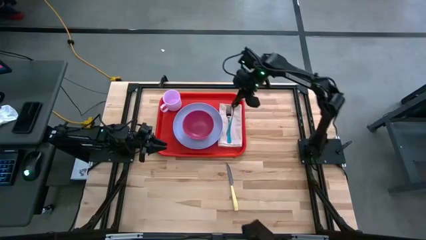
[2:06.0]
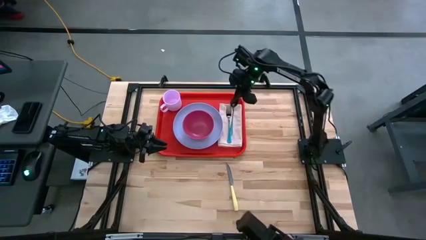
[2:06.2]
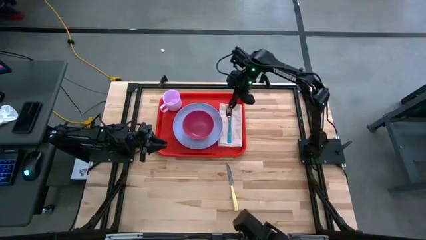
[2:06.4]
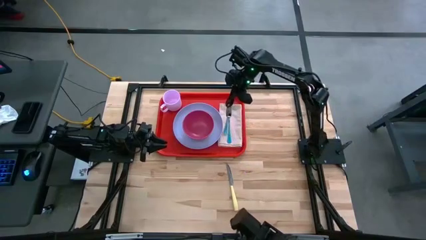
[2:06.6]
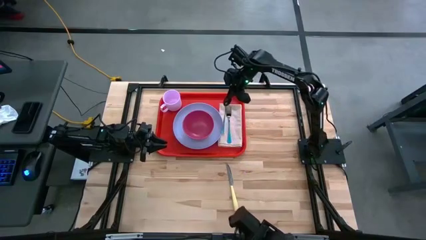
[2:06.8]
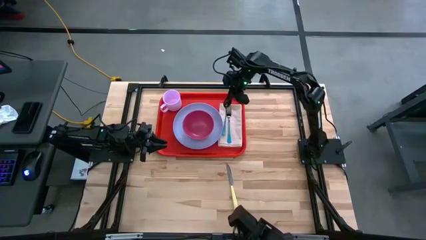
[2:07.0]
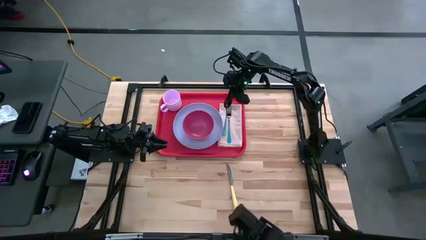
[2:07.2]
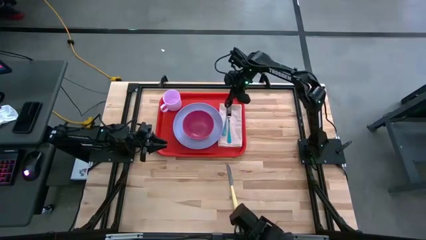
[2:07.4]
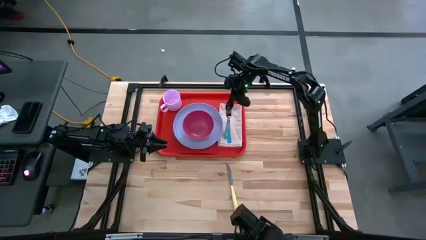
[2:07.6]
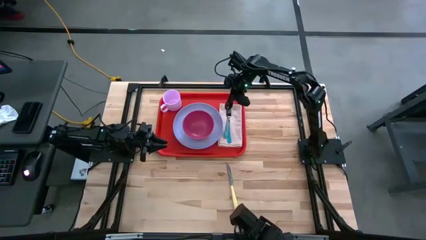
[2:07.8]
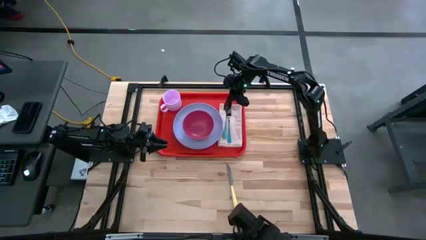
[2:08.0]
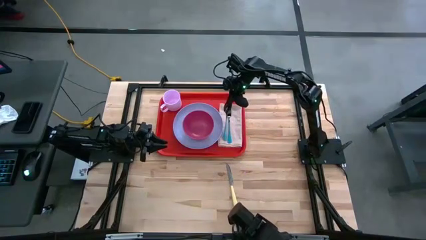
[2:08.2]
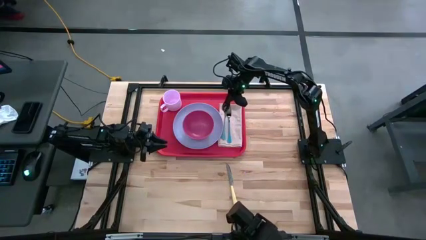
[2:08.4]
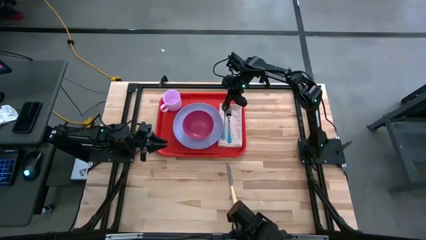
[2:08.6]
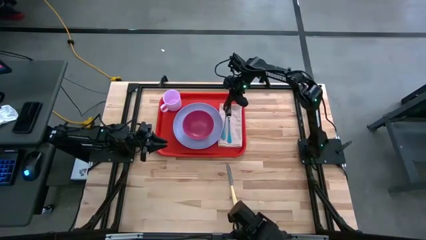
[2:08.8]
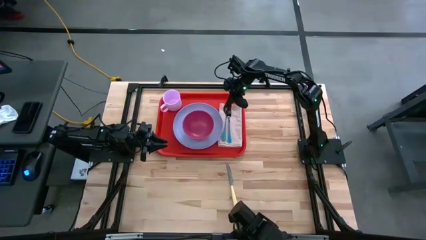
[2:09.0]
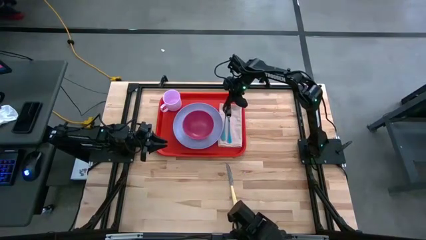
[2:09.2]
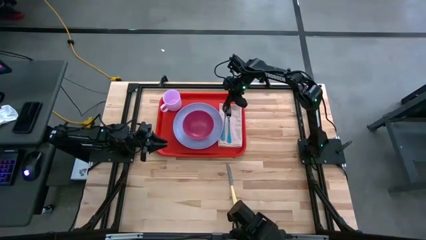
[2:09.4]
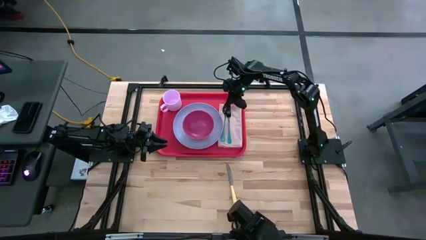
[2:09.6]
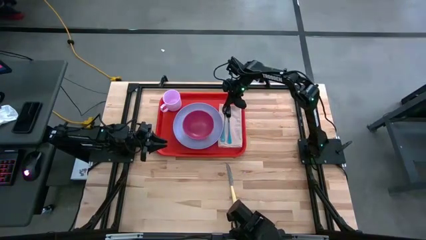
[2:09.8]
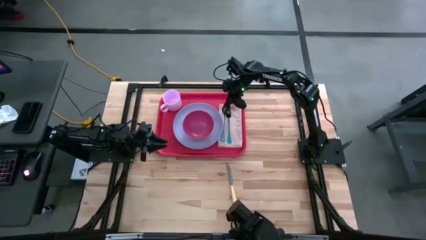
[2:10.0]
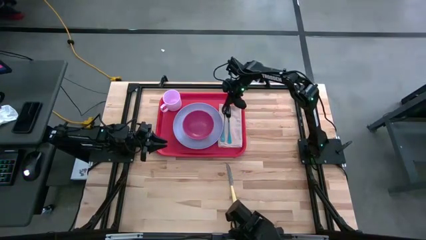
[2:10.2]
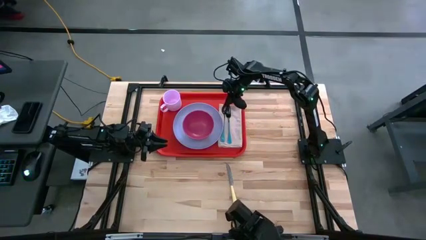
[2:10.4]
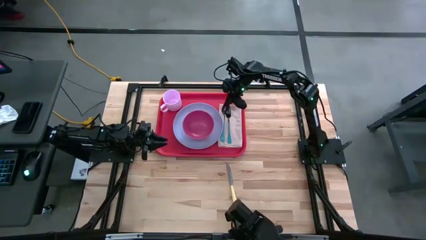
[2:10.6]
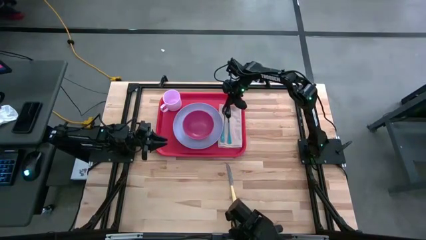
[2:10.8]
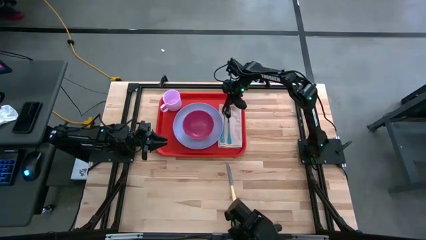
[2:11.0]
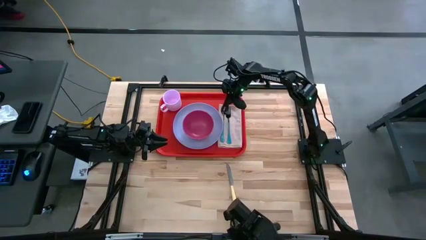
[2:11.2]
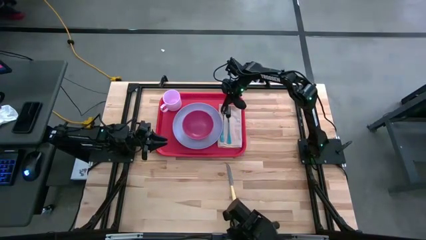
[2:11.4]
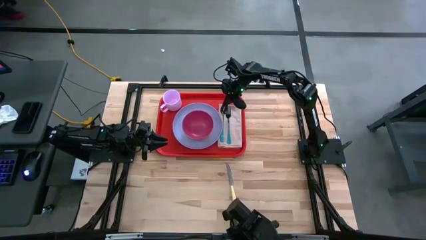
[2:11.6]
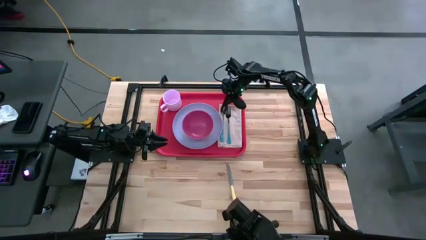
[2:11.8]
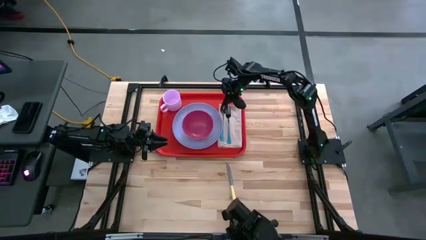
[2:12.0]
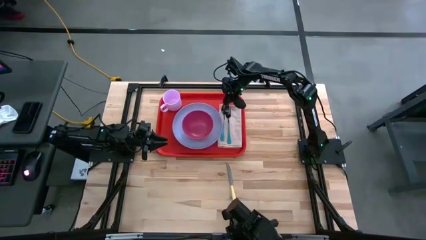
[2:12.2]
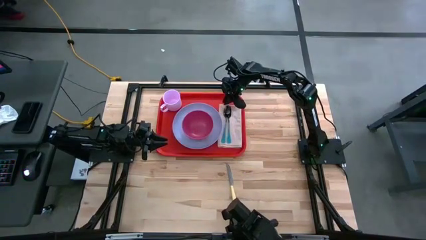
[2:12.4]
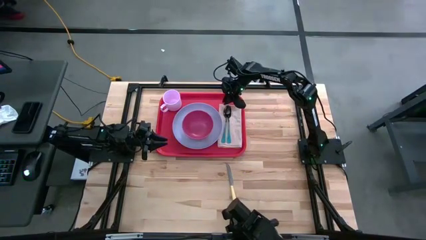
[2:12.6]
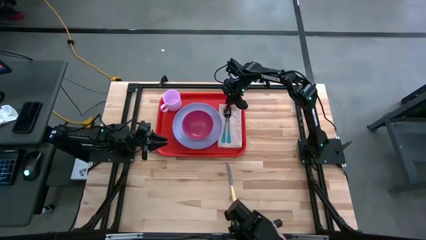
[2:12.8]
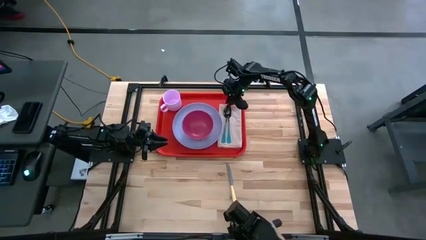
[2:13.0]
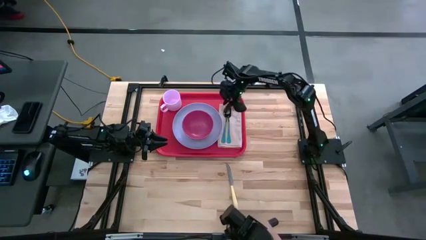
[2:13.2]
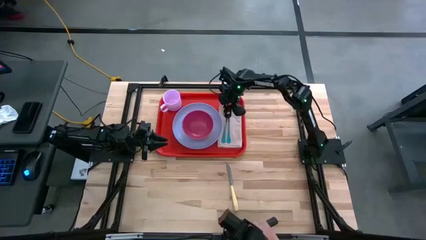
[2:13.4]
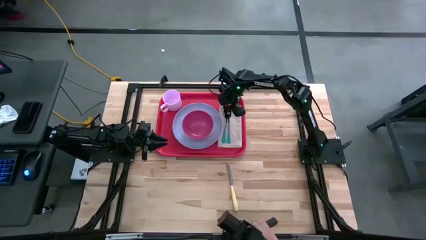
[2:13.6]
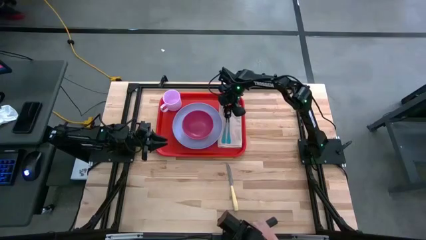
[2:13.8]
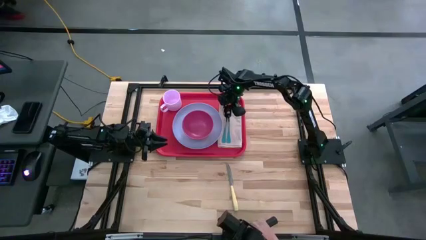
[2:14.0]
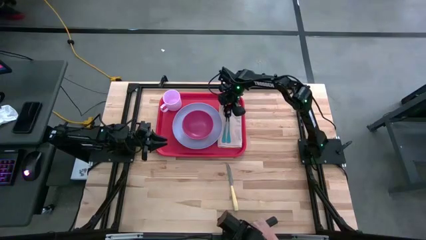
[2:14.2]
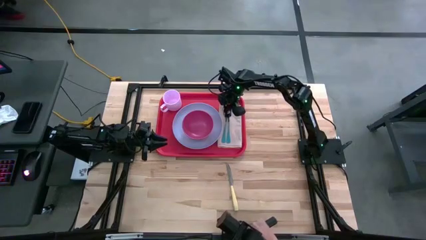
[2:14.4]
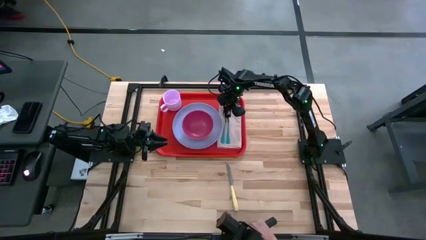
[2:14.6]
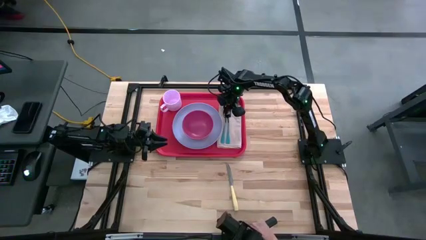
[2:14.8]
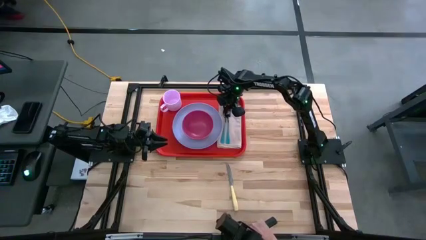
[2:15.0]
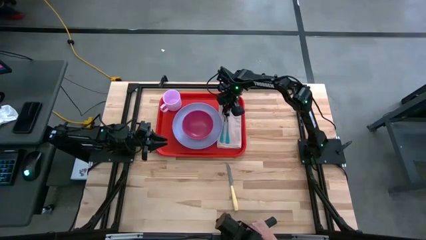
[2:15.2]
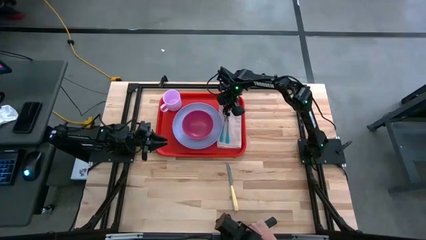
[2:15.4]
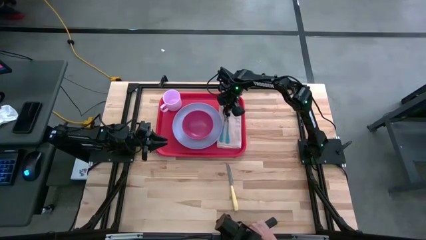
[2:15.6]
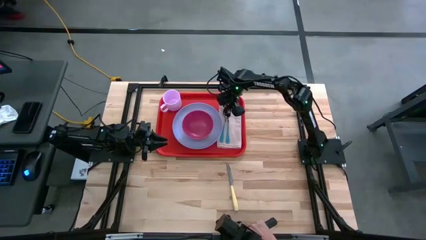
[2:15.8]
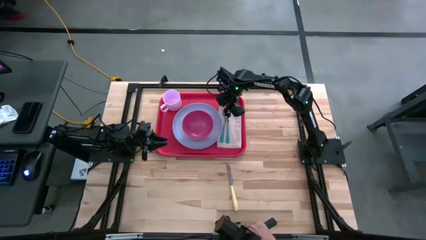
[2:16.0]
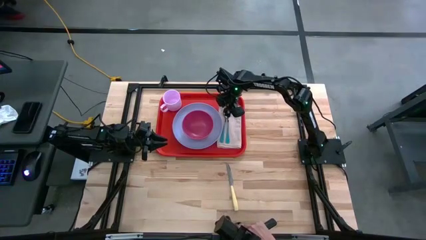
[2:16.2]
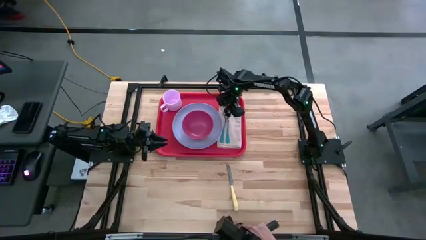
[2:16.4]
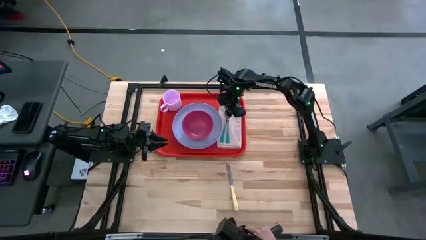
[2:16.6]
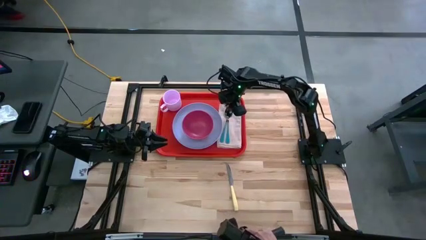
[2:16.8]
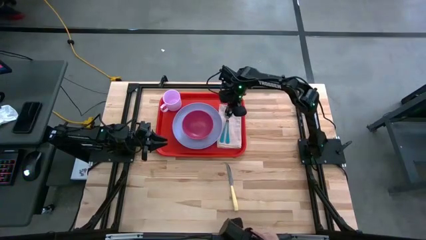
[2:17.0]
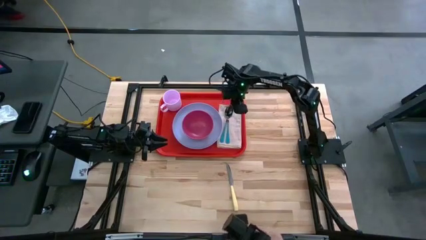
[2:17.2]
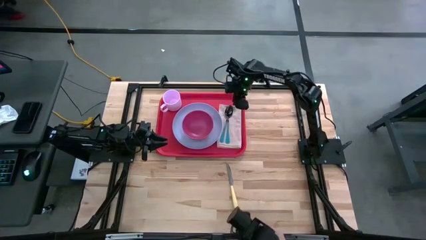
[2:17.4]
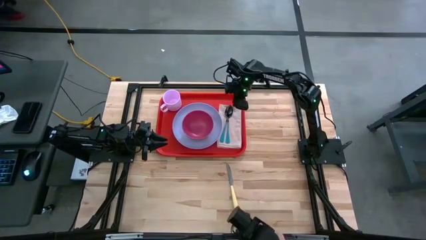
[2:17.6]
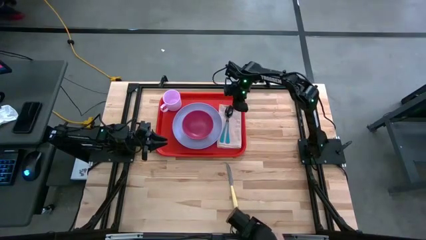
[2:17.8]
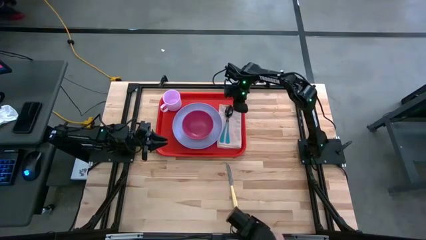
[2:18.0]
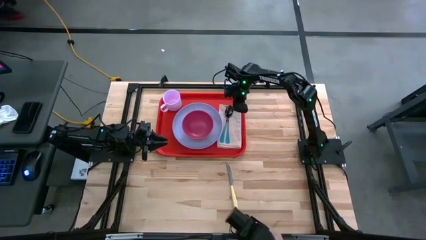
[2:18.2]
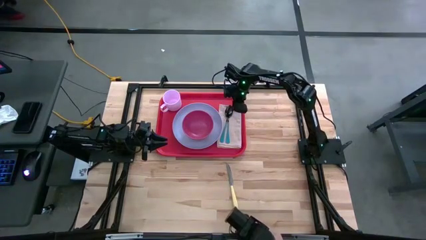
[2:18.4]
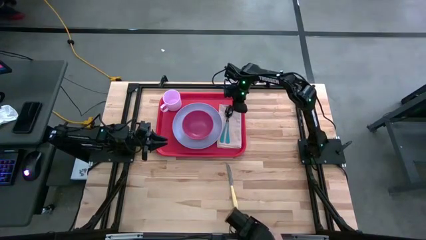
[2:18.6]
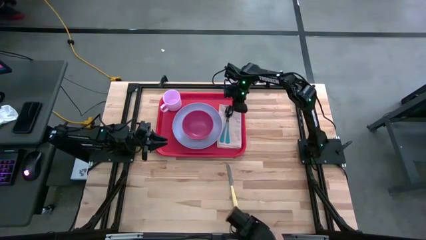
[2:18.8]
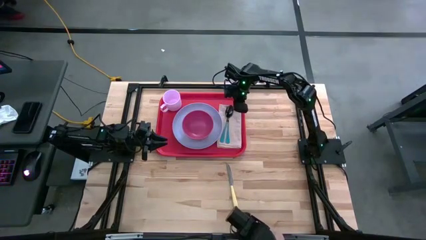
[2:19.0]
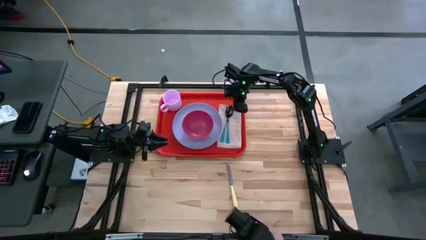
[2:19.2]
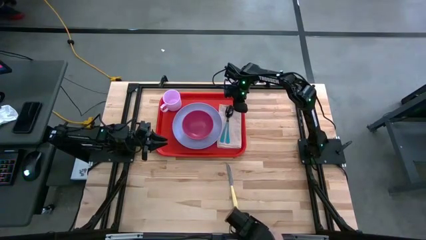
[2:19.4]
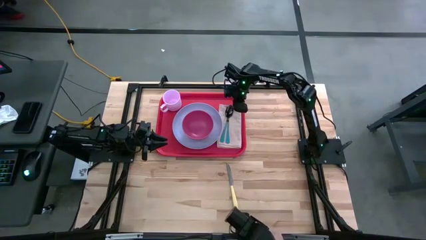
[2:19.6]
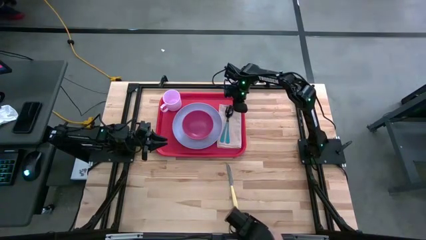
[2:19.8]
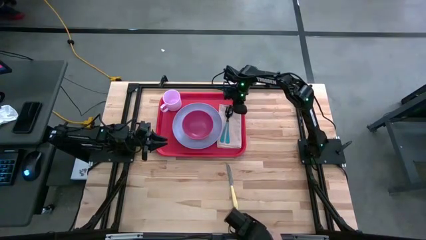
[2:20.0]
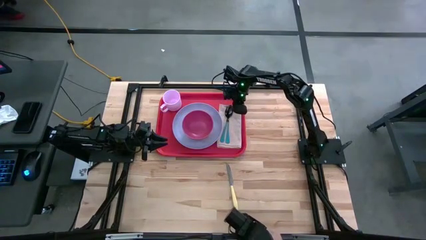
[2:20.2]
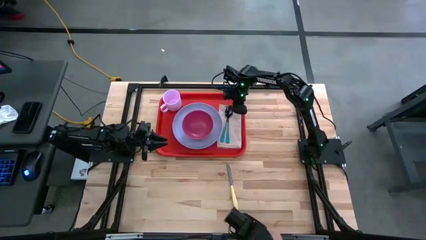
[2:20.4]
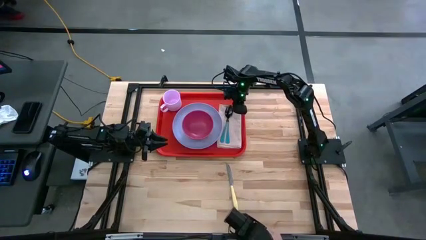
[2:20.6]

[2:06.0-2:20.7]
Task: Set up tray
Put the blue spoon on the white table napkin to the left of the blue fork
